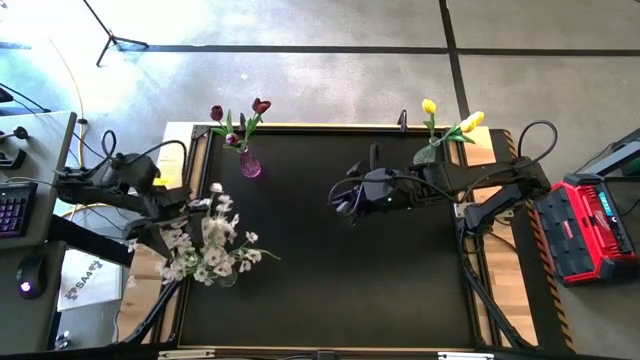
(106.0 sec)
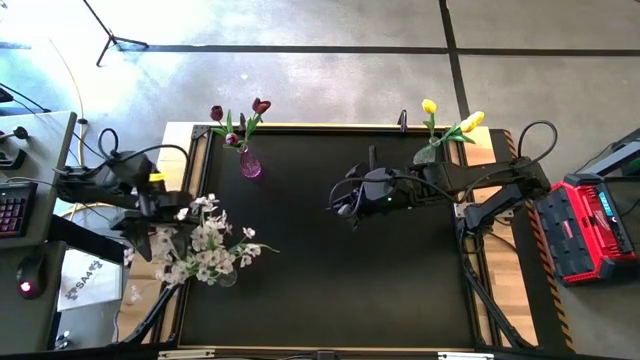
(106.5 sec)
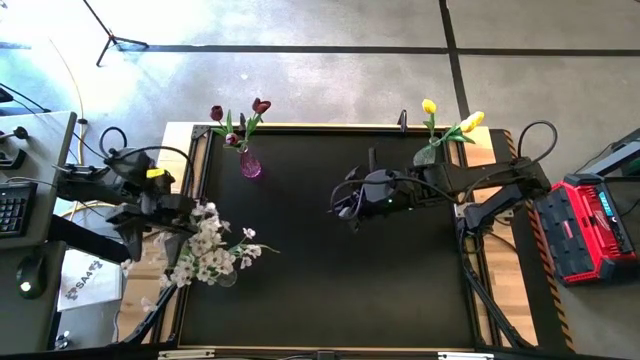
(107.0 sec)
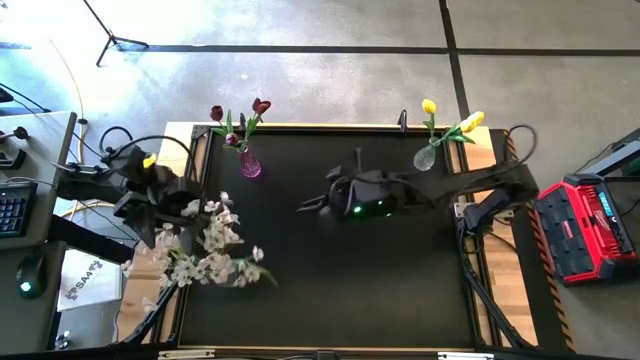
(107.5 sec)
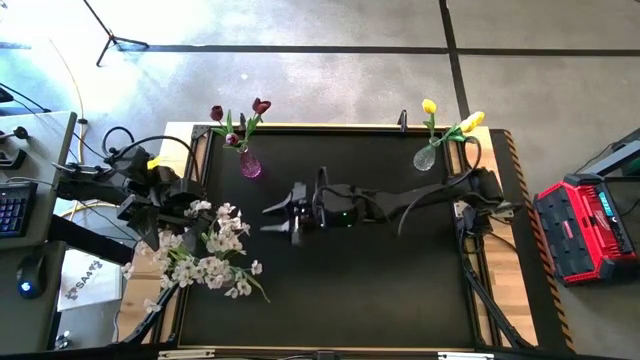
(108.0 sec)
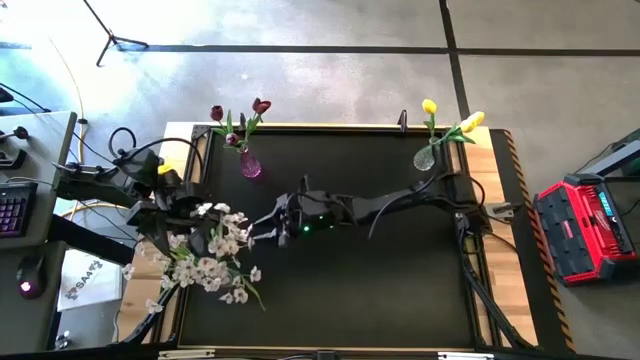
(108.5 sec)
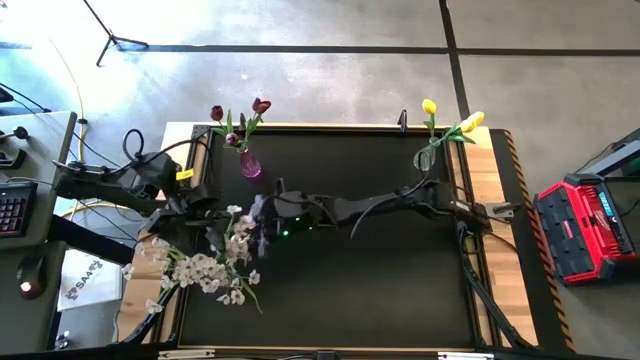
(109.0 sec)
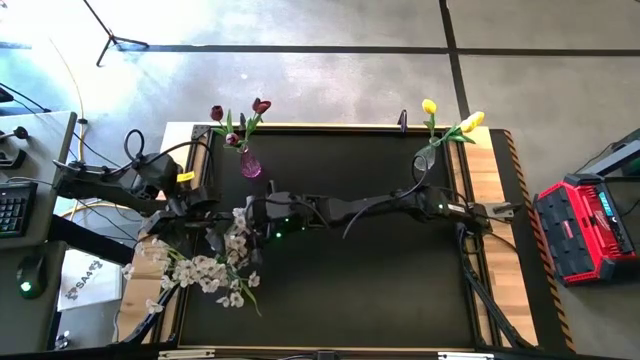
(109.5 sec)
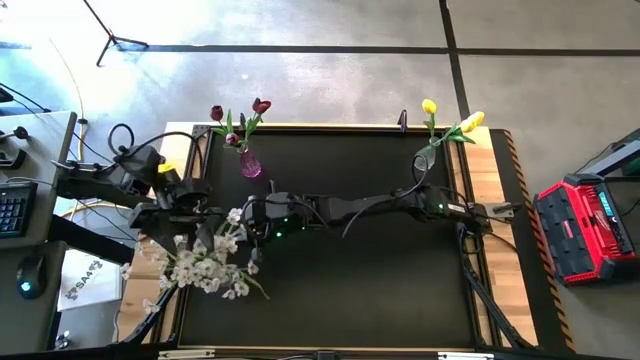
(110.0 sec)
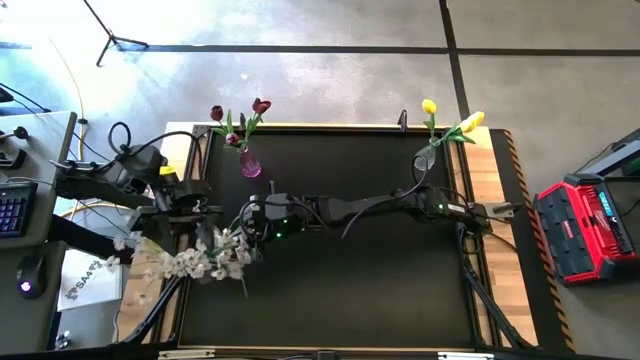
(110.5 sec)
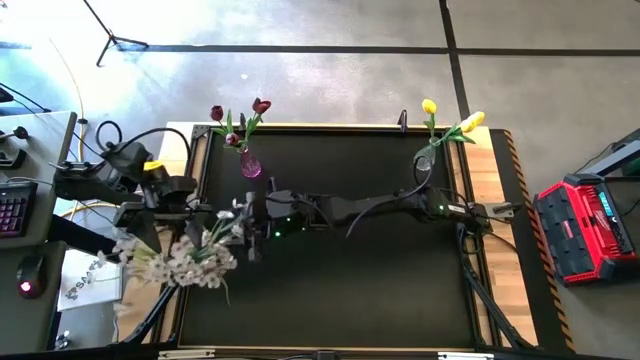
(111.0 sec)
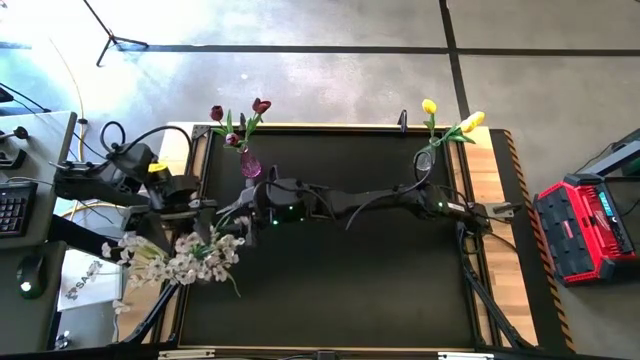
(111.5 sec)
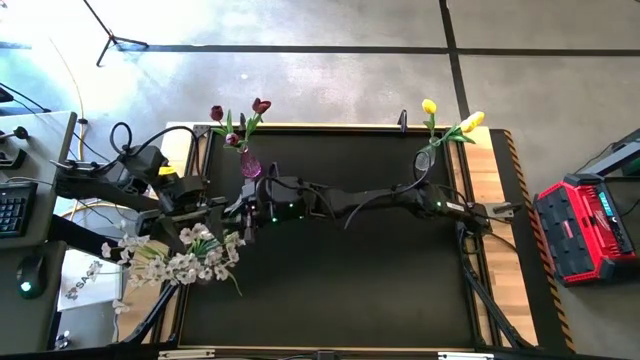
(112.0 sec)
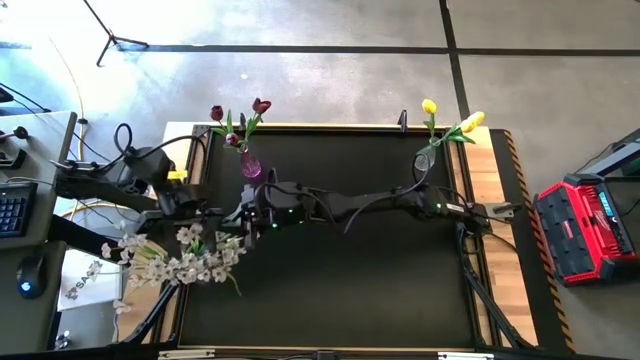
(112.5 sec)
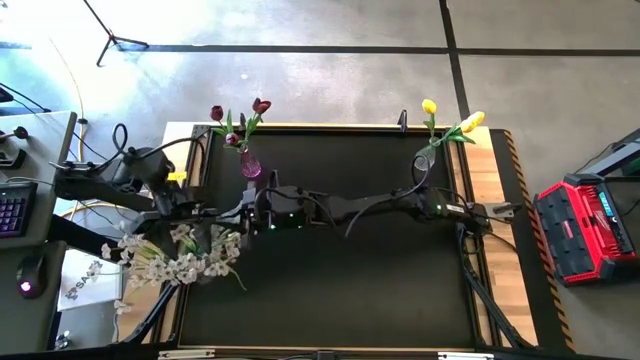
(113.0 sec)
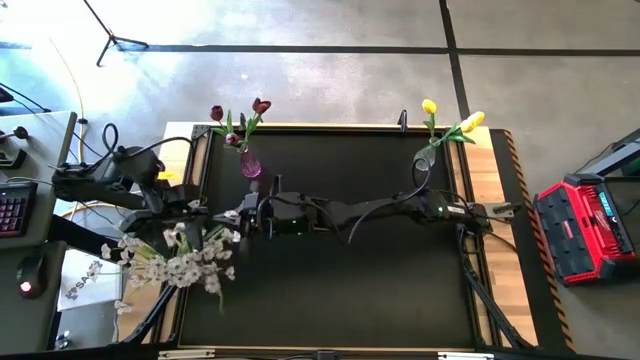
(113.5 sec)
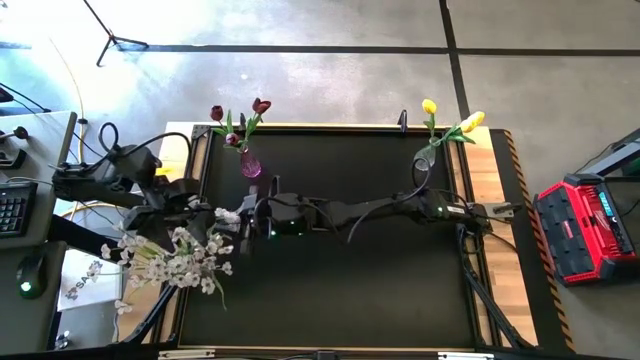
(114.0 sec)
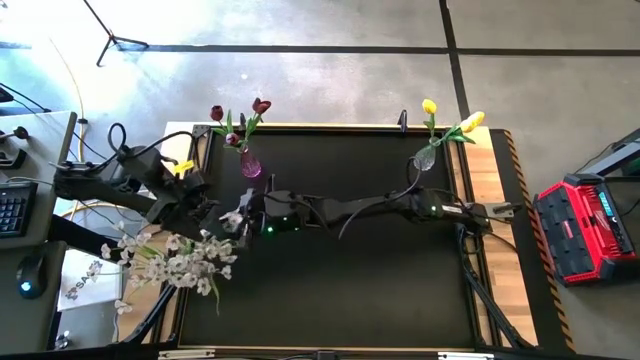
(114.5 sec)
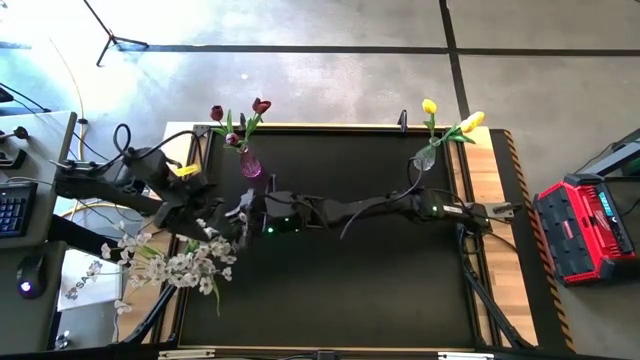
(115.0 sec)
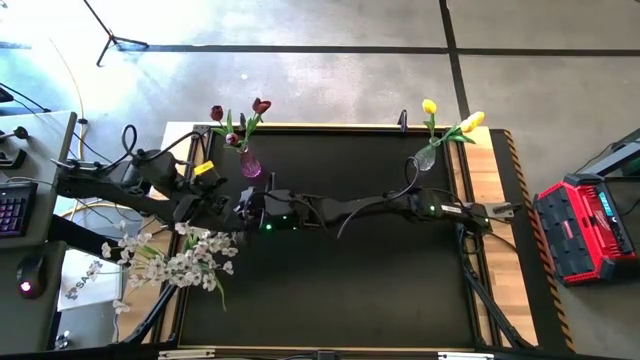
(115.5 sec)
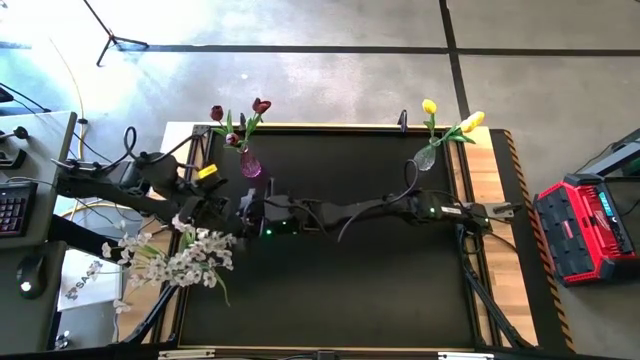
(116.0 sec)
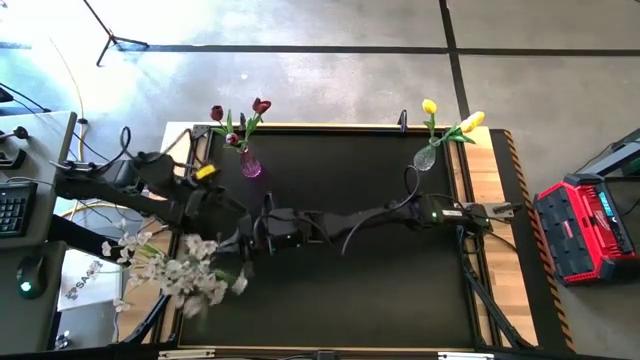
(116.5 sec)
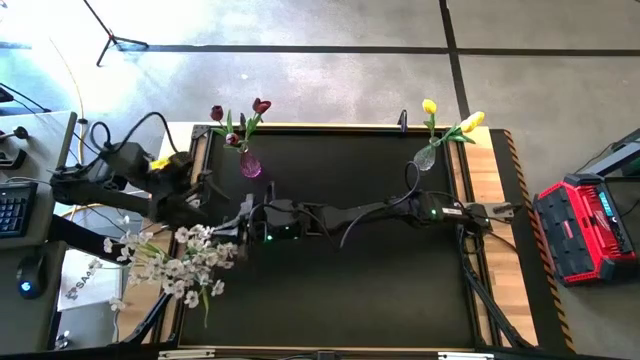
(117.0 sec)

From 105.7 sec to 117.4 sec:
Task: Sort flowers into vase by color
Adjust the white flowers

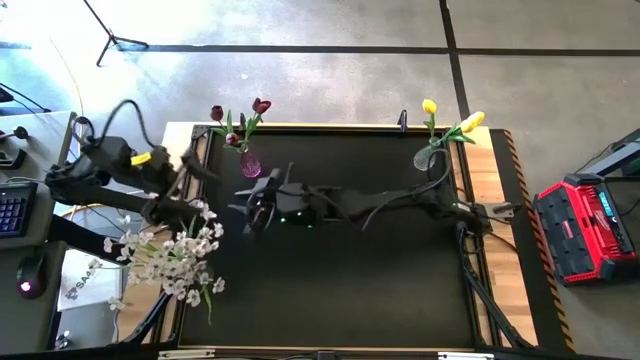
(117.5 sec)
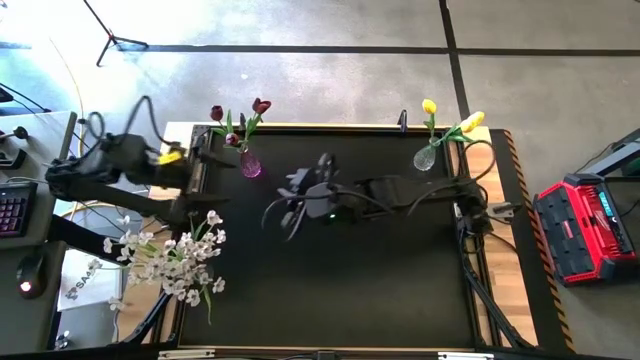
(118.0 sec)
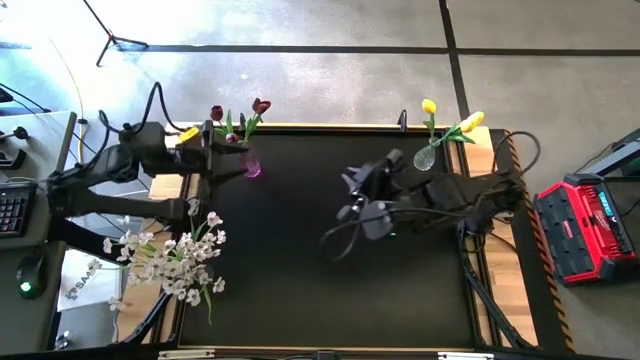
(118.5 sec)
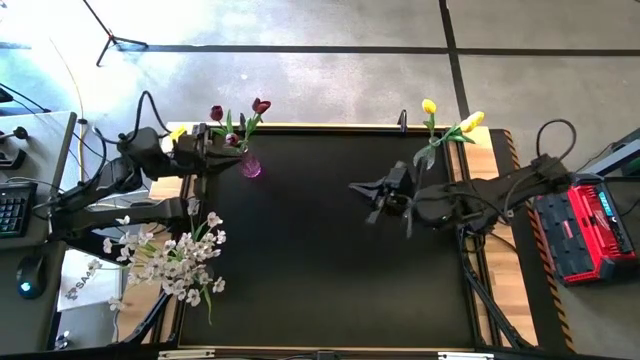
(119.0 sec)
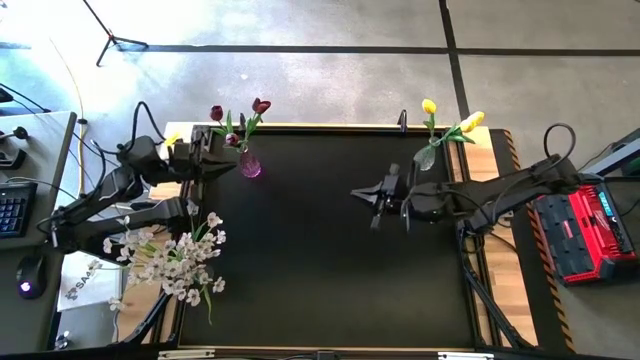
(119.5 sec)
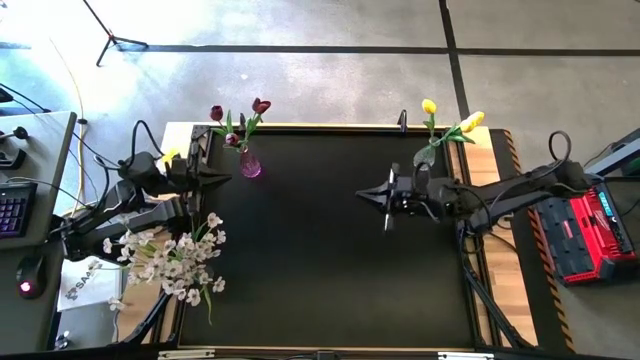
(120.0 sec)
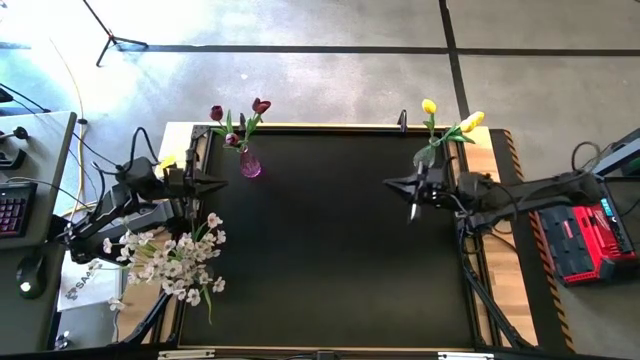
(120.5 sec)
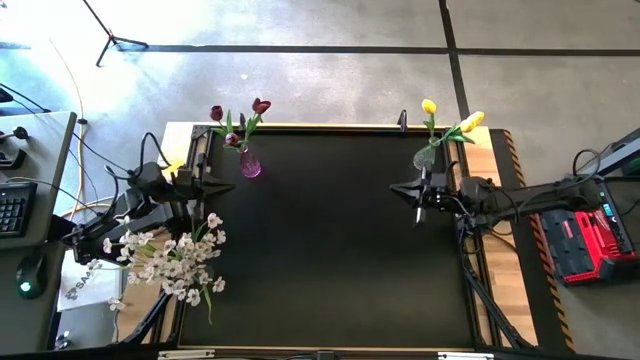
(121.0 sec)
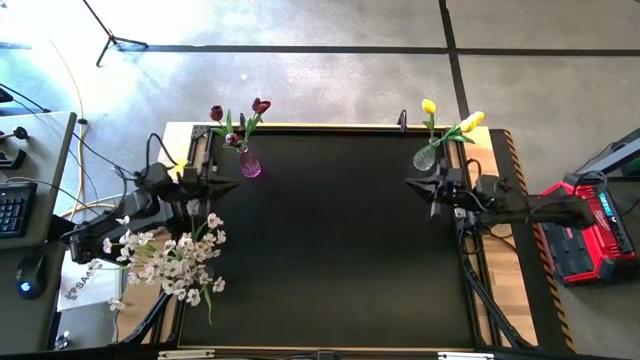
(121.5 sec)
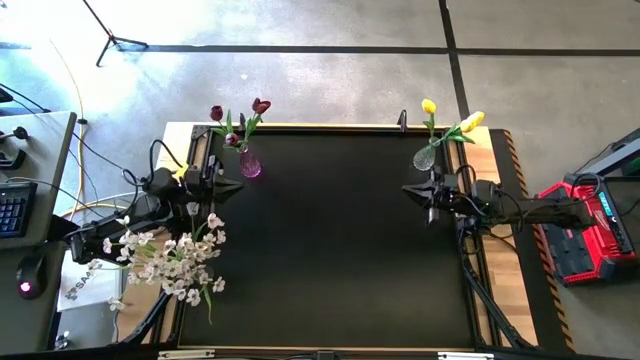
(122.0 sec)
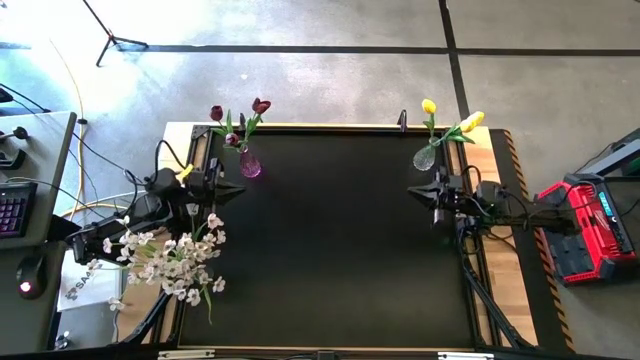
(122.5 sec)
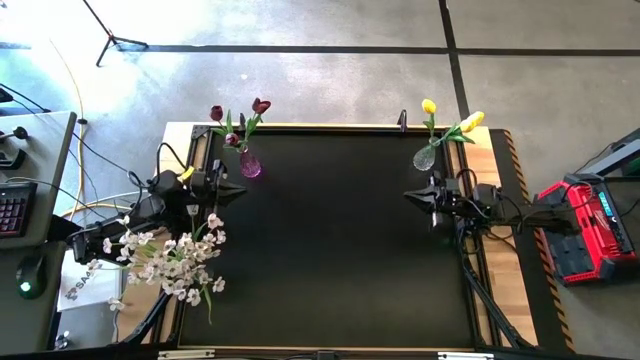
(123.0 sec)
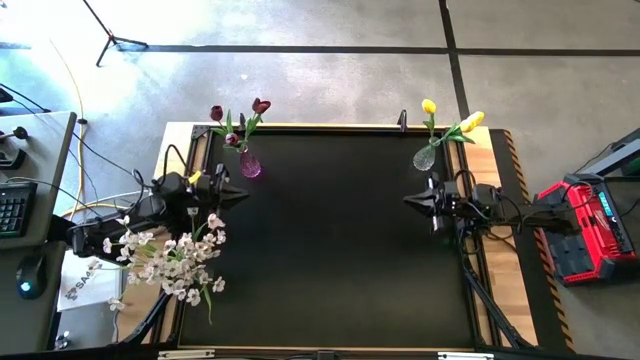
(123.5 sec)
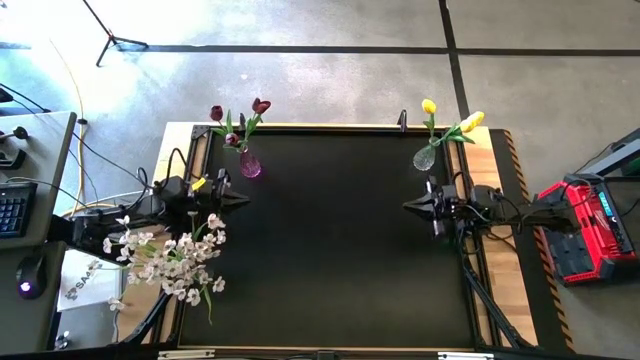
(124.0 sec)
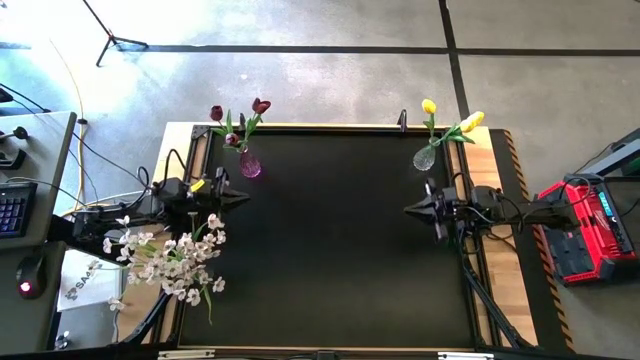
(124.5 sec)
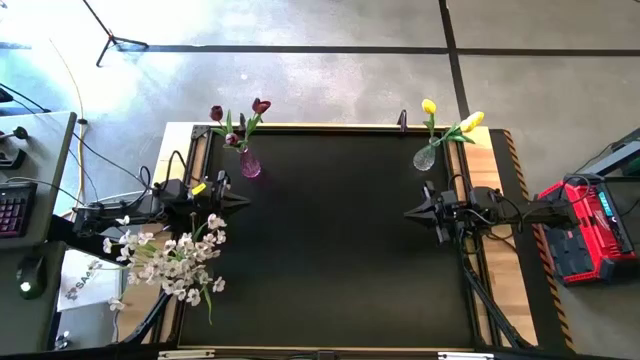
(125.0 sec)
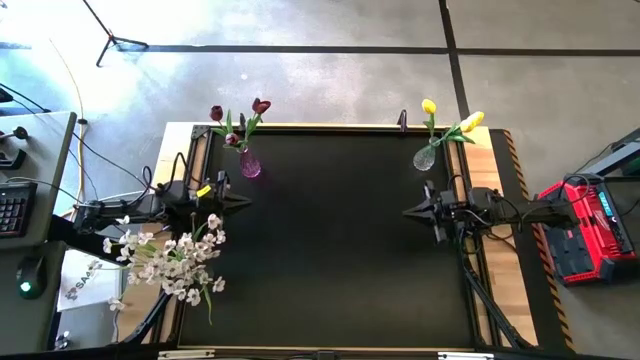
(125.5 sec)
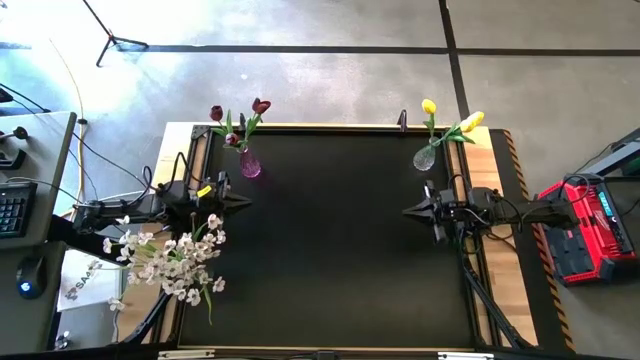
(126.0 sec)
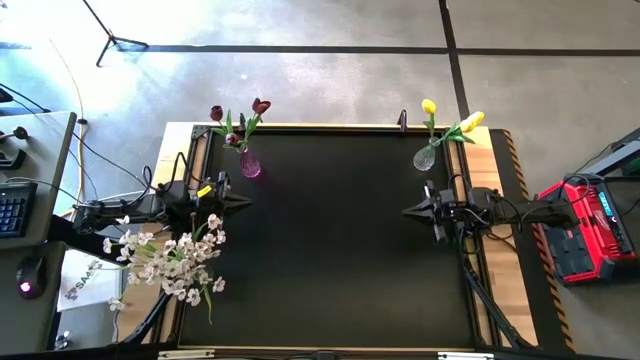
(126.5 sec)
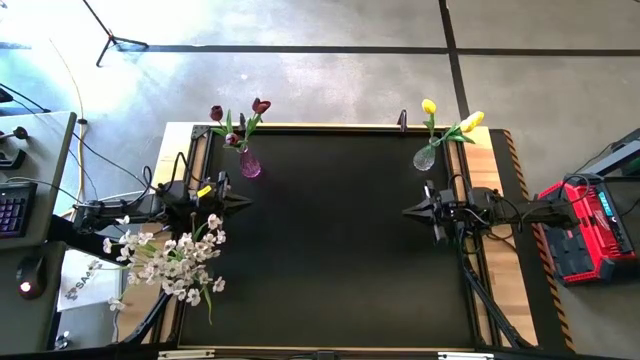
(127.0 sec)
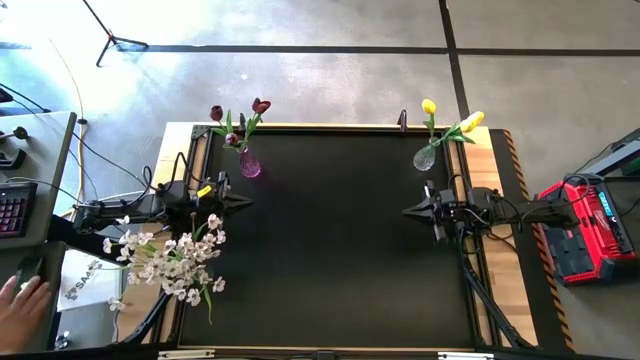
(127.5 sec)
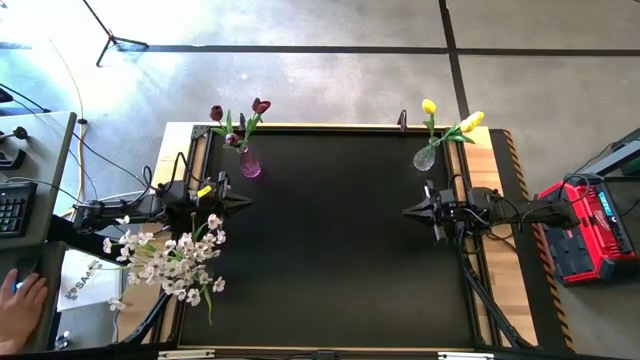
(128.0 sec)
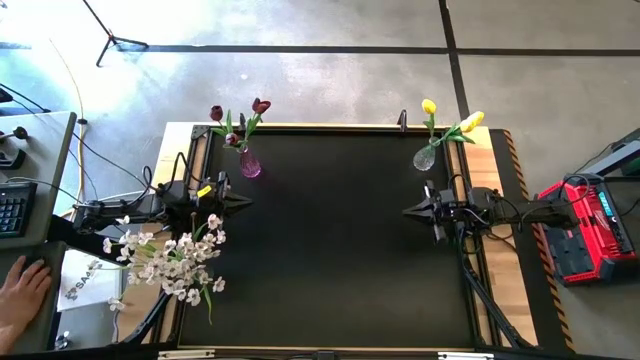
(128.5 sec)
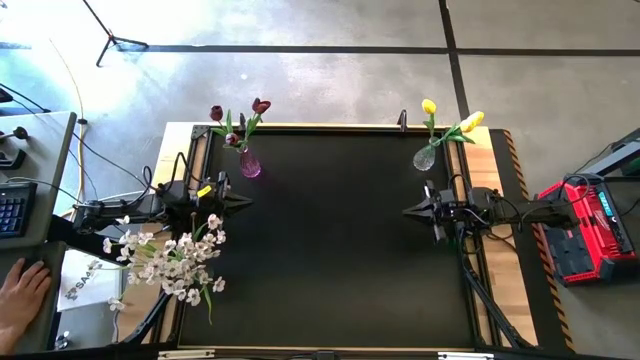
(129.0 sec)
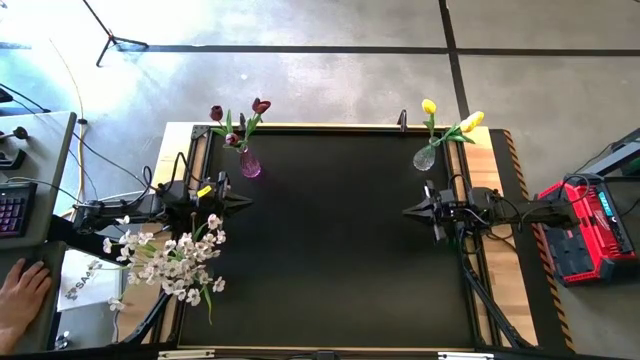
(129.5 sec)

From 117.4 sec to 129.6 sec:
Return to Home Position
